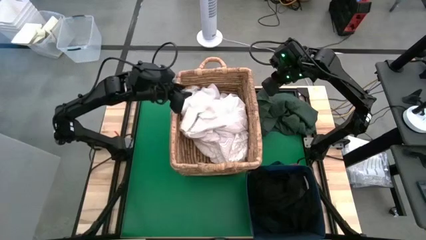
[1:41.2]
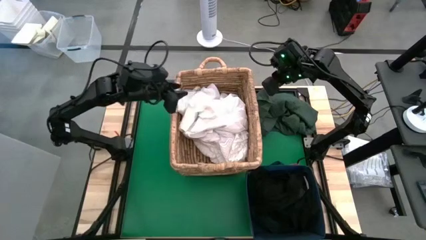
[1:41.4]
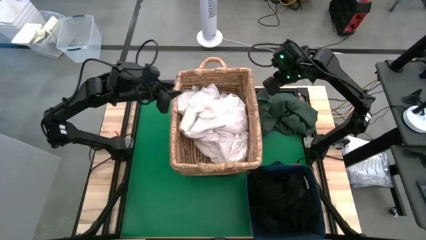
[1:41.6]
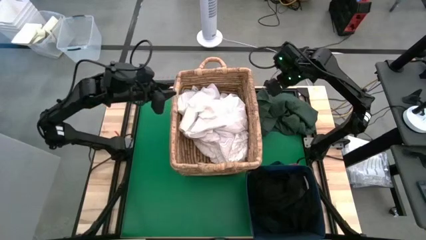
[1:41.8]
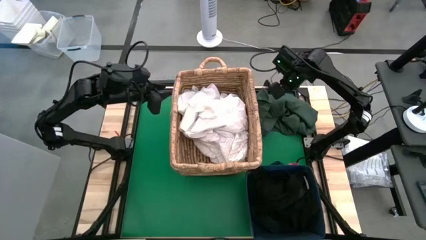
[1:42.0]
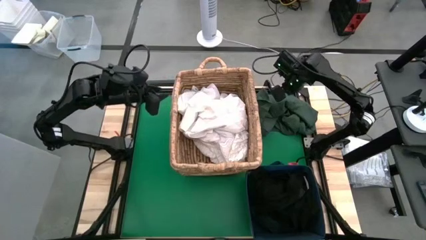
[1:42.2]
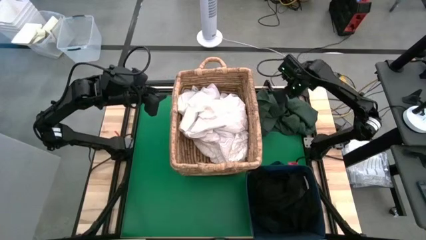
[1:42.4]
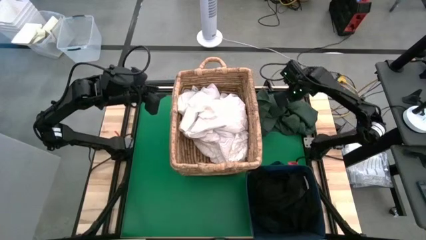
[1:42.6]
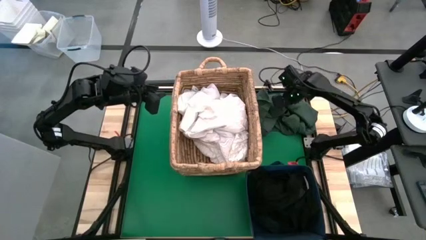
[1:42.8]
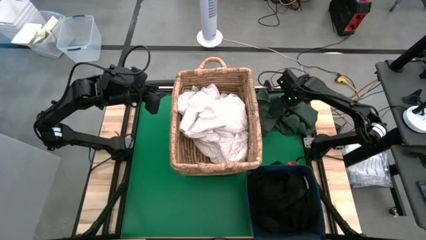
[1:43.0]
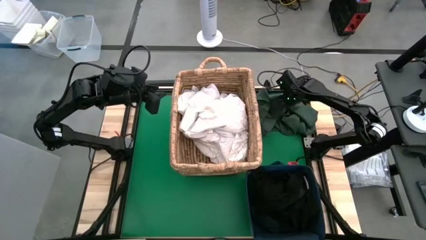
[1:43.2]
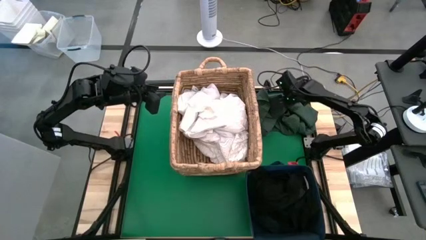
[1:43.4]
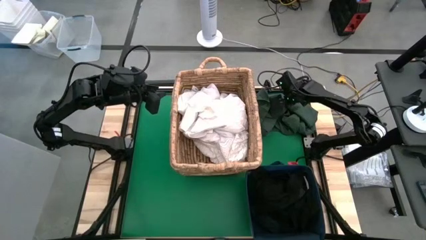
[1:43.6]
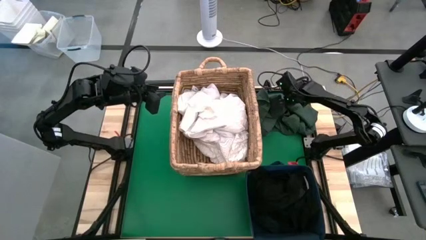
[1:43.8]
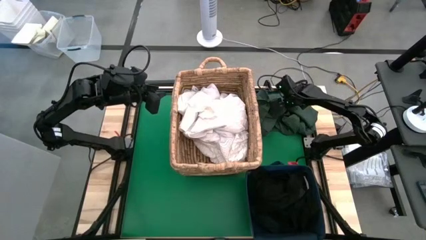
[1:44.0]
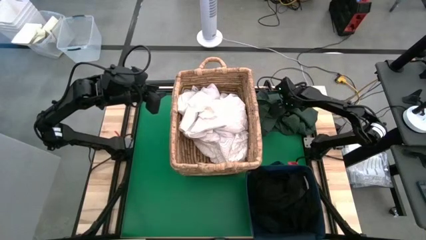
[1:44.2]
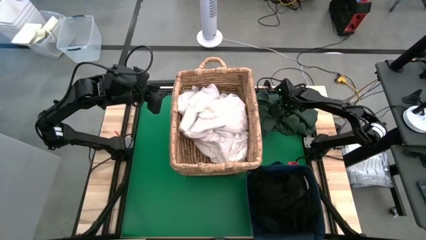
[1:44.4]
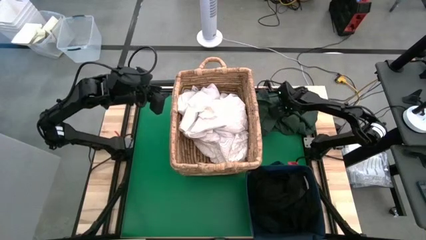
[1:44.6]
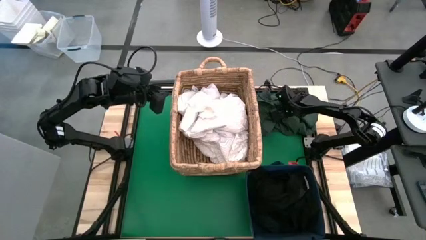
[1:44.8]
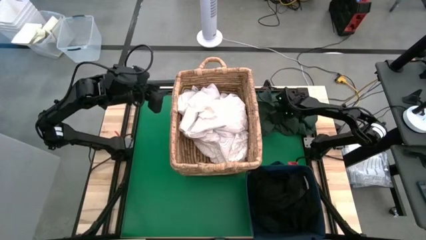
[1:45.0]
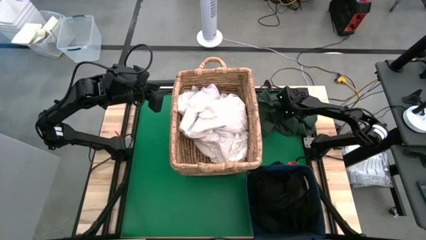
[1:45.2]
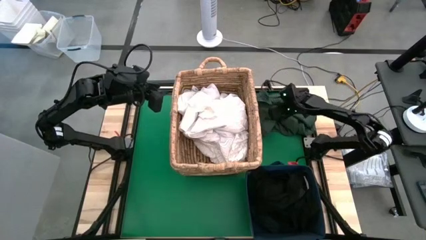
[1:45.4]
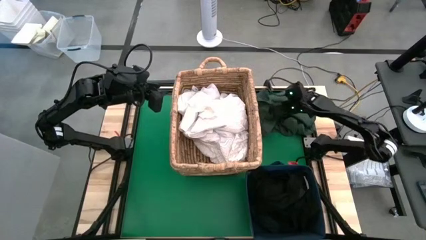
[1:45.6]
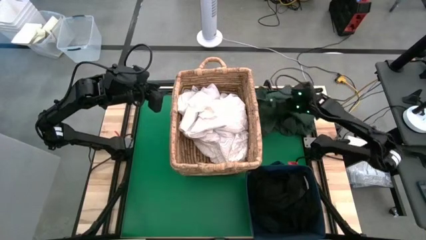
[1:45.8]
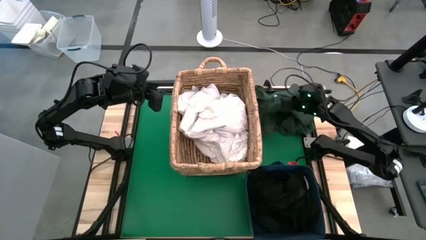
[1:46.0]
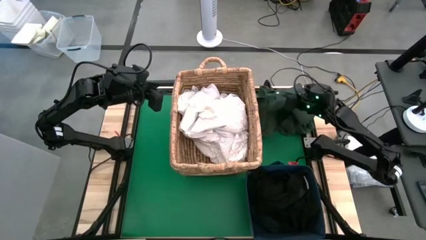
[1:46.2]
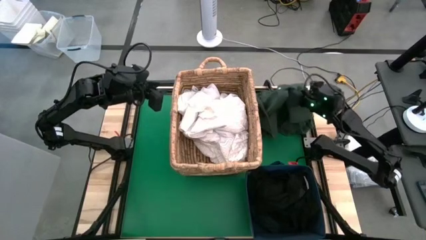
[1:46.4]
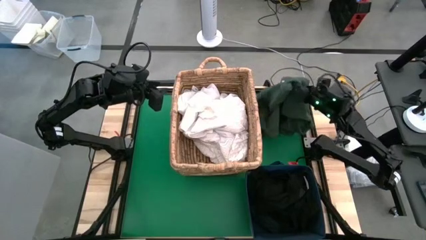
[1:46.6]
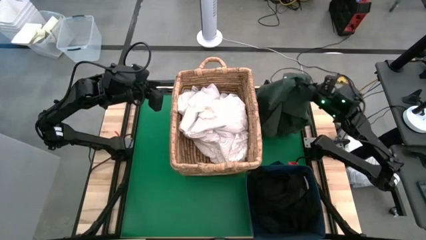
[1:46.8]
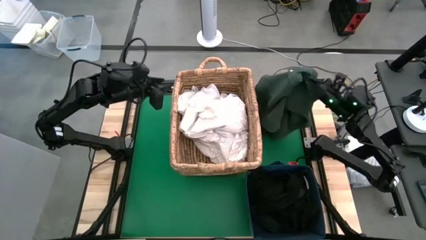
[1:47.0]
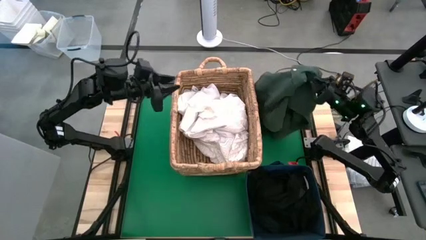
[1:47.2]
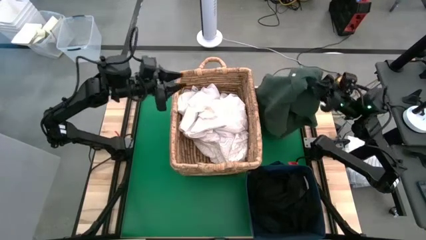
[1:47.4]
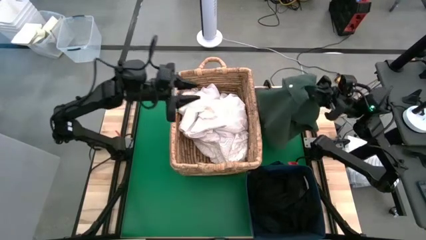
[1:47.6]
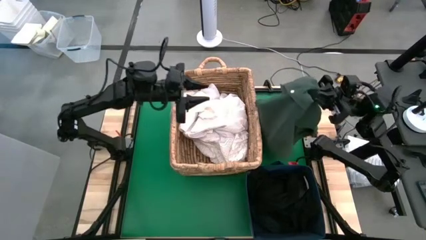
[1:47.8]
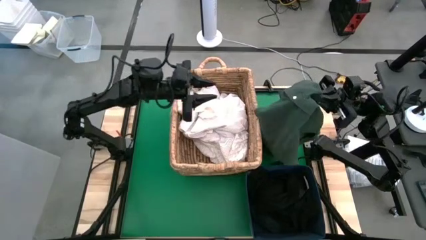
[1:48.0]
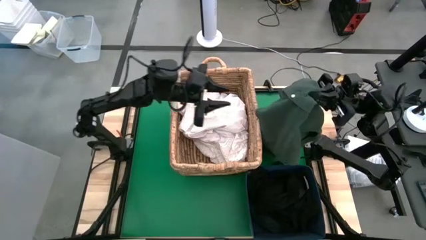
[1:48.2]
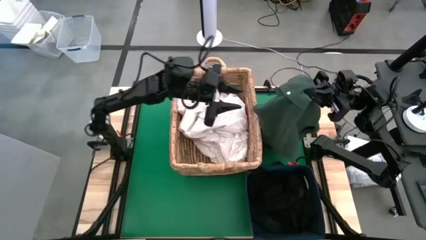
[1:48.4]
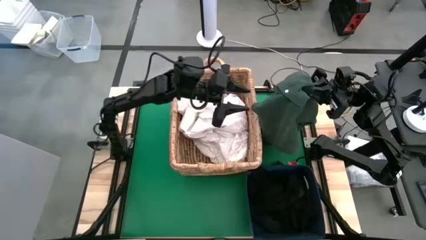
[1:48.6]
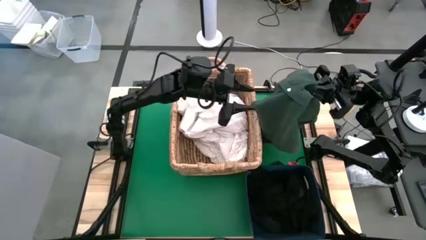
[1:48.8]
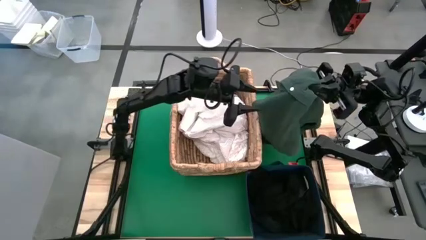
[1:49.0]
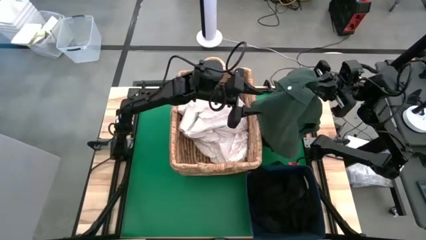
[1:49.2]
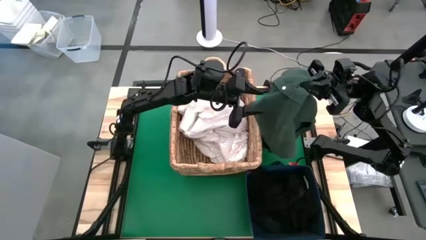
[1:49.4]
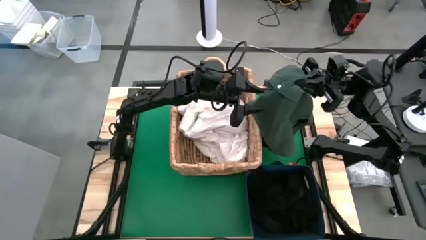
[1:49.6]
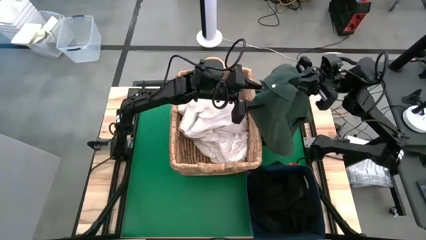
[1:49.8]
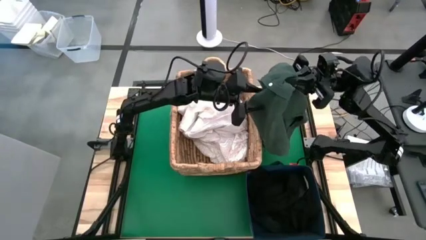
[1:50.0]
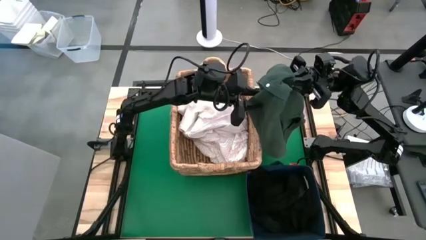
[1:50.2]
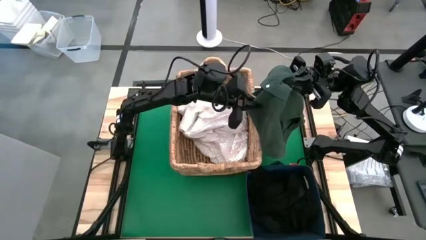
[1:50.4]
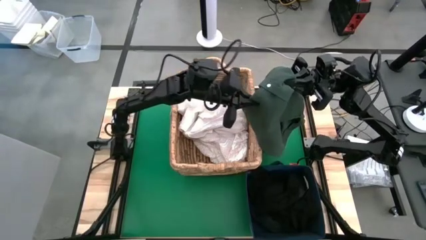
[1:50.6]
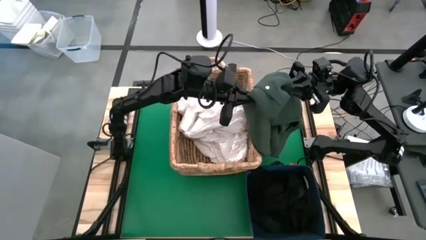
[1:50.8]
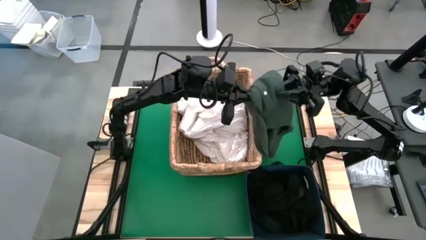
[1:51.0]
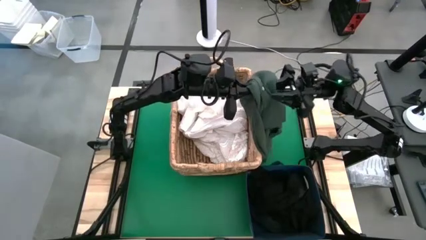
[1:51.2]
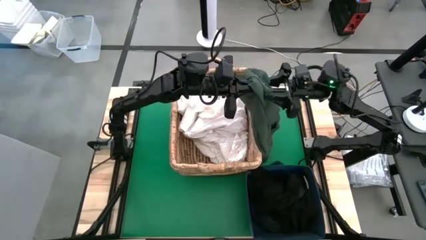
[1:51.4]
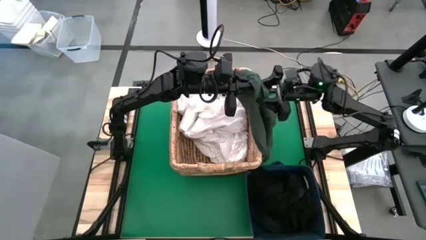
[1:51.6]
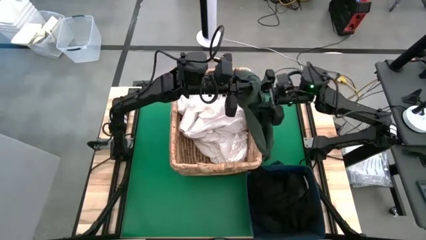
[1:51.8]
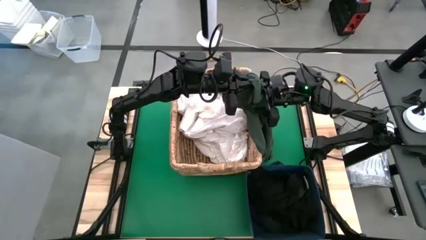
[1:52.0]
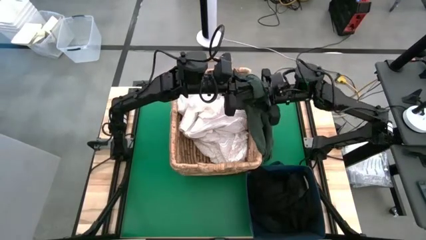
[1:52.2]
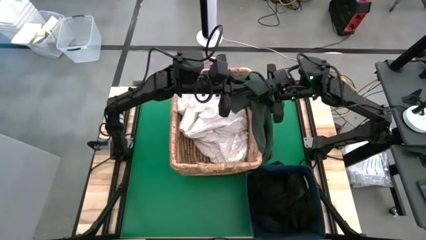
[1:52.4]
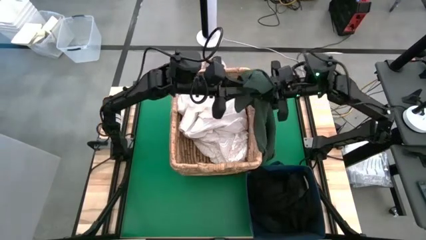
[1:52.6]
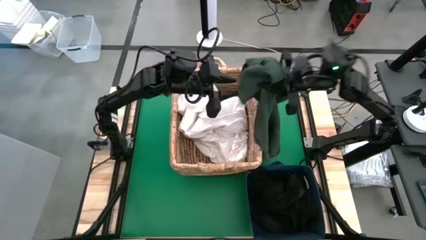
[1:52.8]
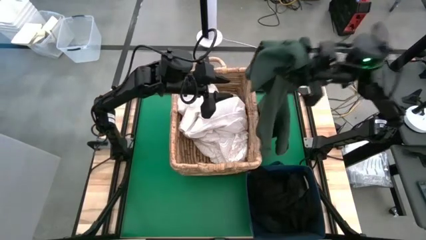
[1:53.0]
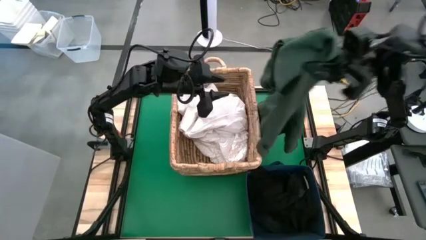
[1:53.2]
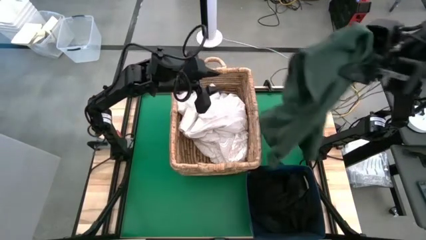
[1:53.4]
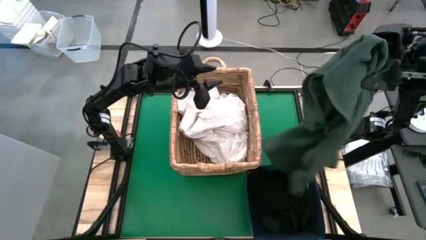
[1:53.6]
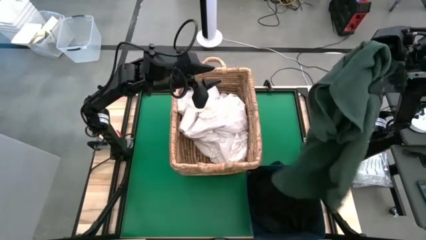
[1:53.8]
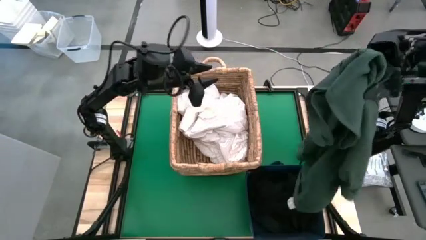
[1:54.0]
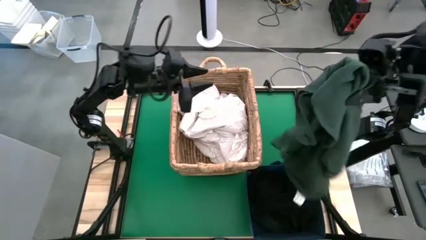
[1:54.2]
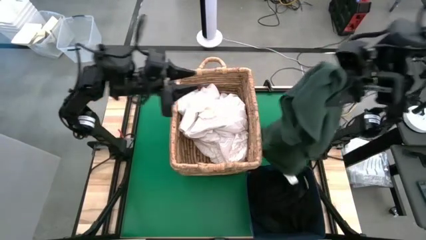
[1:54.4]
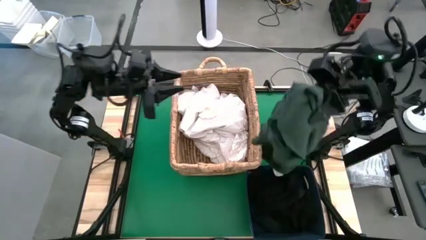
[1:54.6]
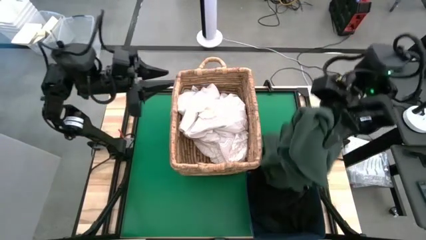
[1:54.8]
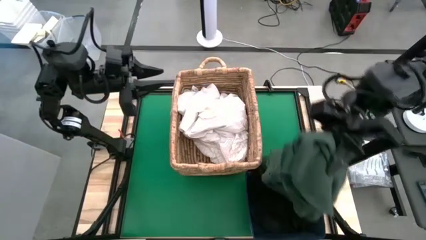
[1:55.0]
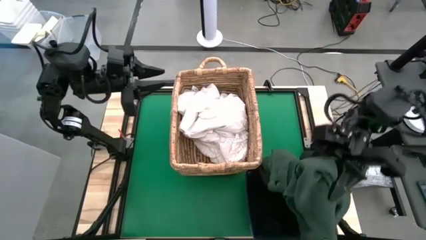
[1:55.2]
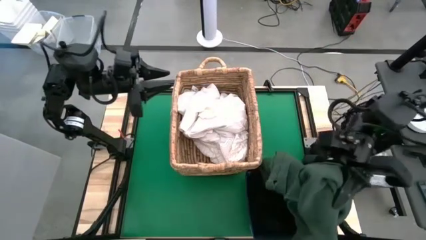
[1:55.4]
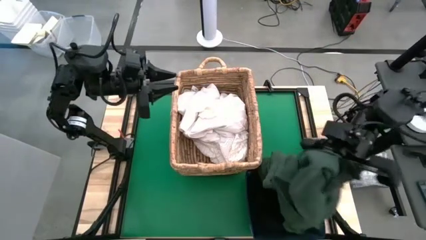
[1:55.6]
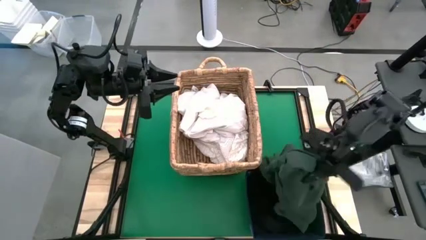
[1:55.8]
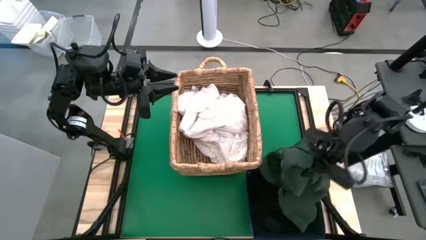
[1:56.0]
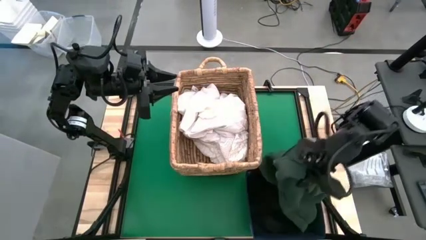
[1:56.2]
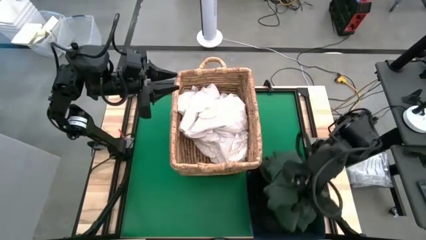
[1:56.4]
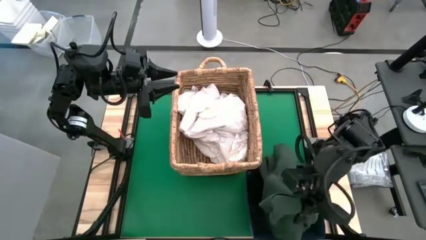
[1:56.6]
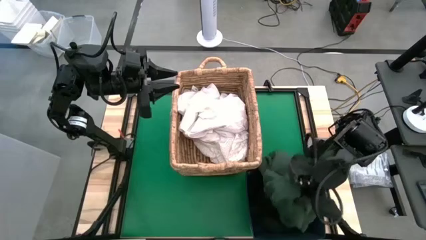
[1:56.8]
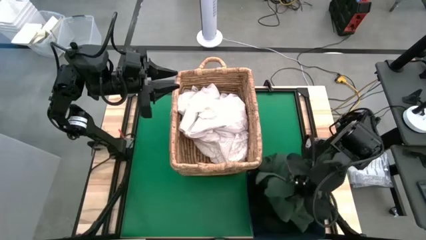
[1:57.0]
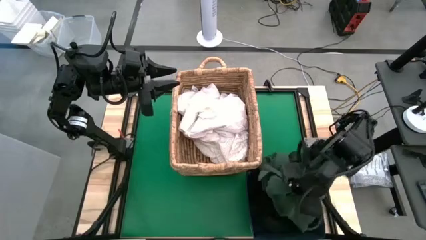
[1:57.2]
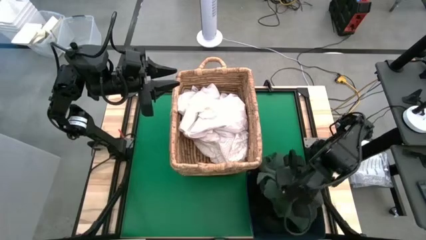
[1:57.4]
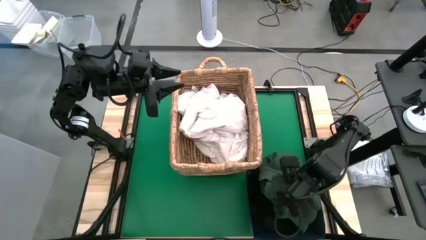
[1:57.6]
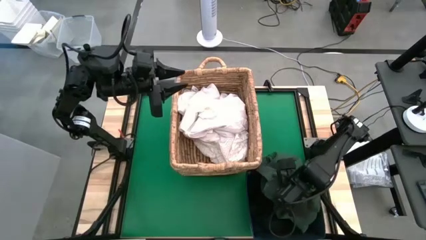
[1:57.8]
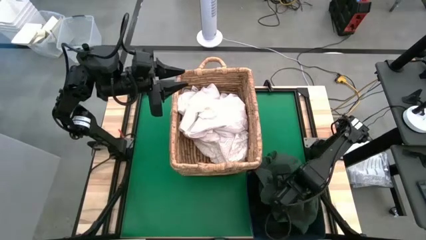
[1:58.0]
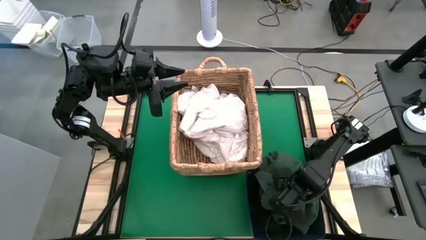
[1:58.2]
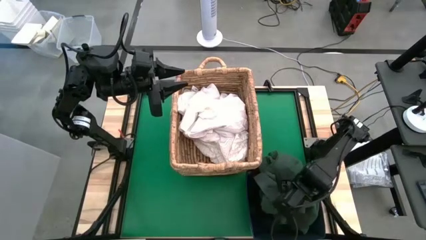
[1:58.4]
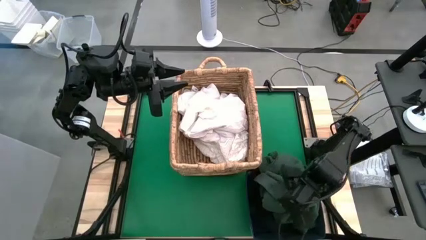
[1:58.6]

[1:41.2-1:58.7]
Put the green polo shirt into the laundry organizer
